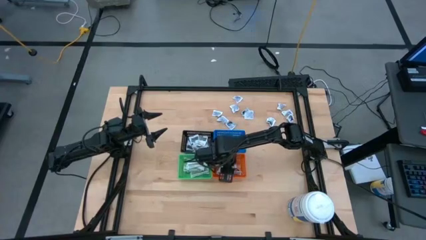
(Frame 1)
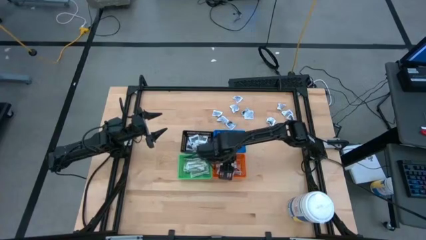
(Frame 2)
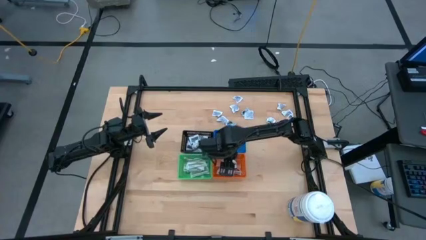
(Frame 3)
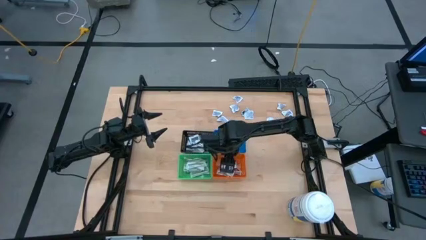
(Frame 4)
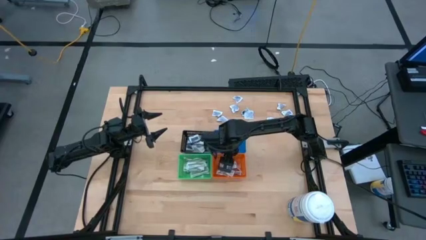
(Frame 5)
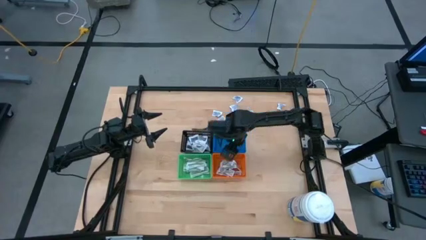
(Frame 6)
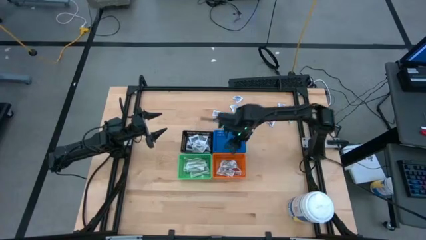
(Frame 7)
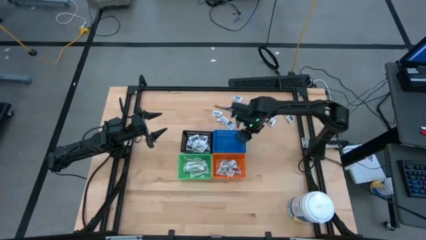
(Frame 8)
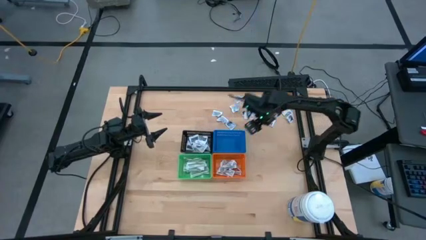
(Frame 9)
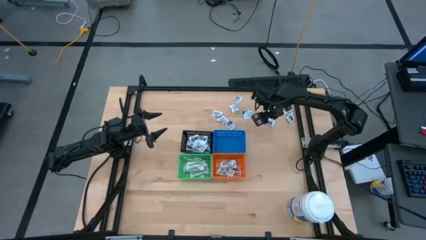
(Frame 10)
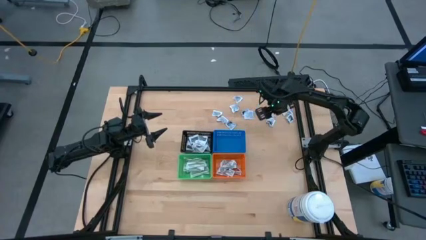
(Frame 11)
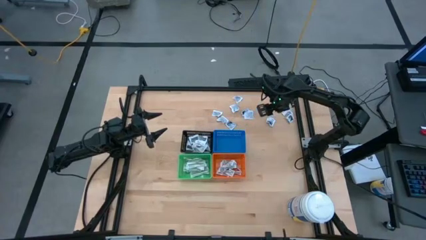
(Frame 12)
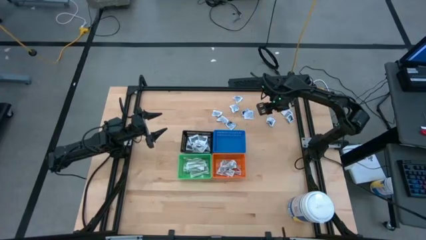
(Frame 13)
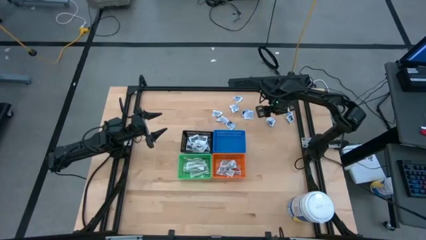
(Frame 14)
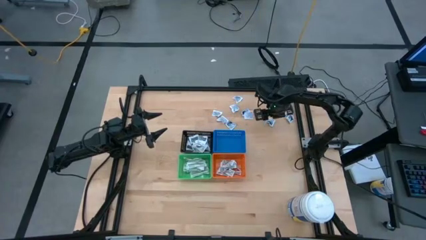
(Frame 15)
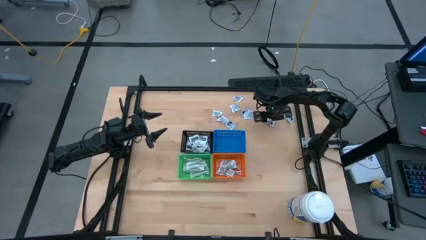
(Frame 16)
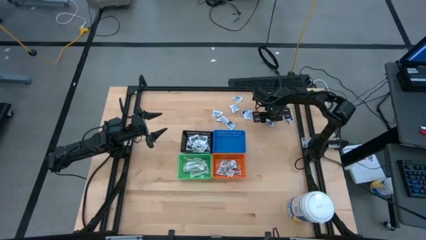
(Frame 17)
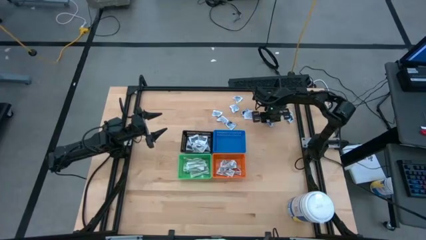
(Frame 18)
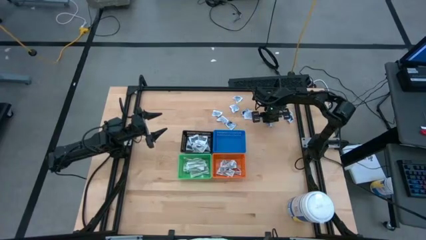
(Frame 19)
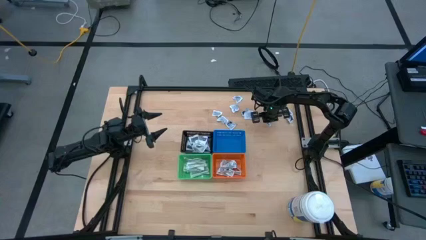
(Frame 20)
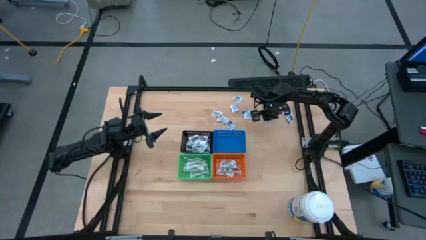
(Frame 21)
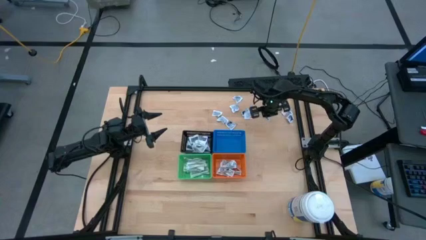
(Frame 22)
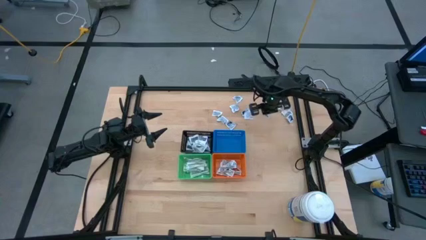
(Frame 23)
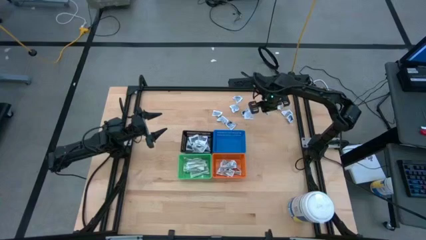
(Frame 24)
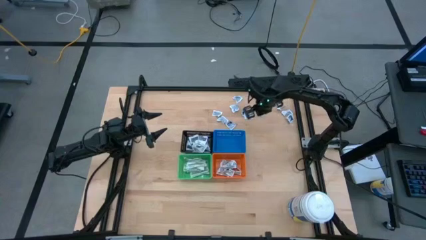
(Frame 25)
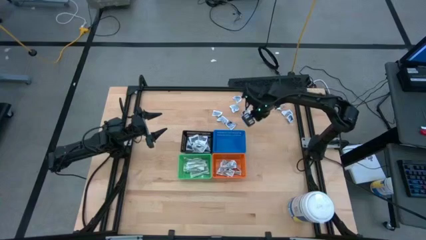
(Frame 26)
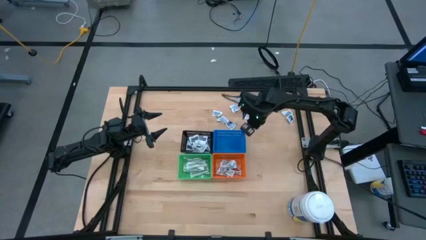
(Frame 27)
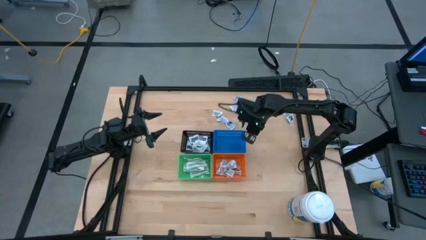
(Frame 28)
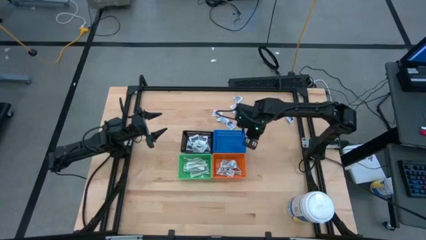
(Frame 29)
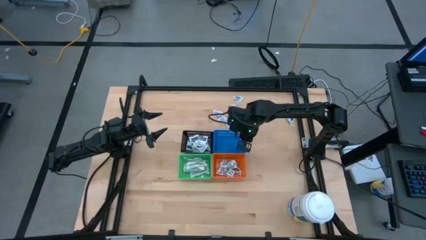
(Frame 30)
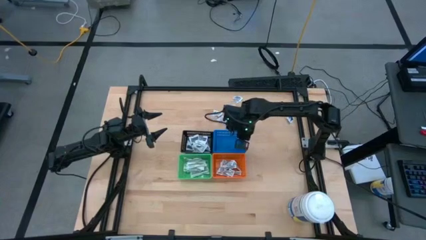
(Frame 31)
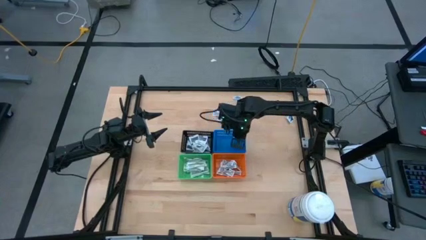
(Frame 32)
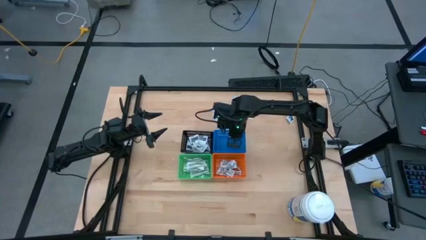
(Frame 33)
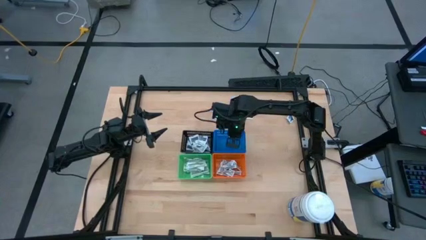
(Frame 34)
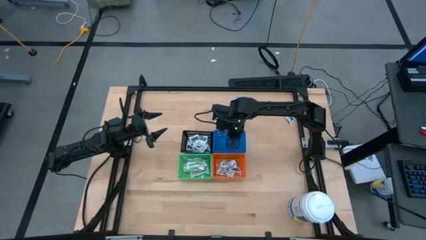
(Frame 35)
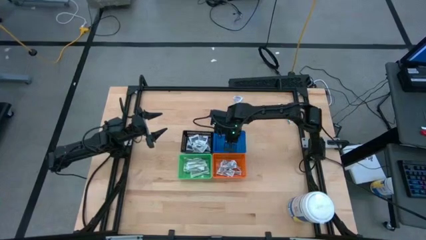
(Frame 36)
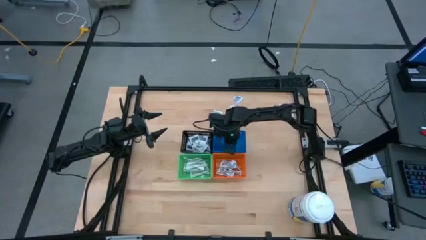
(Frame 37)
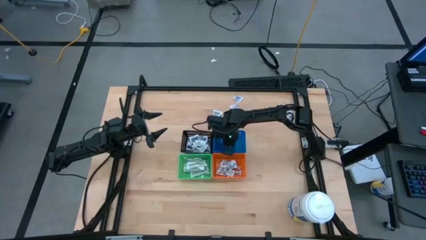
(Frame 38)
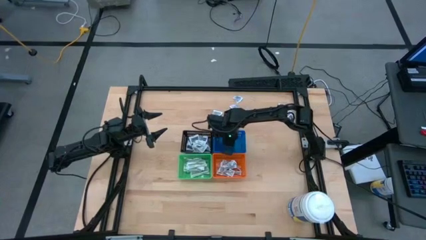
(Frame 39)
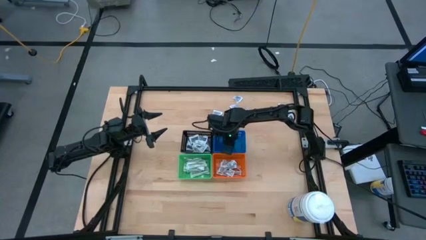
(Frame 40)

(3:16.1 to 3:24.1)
Task: Pick & Place First Aid Supplies
Put the alcohol pad into the blue bin

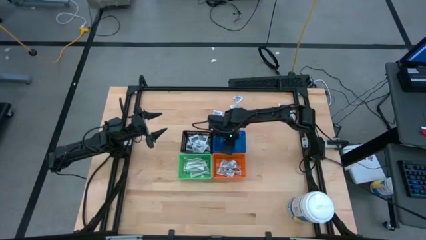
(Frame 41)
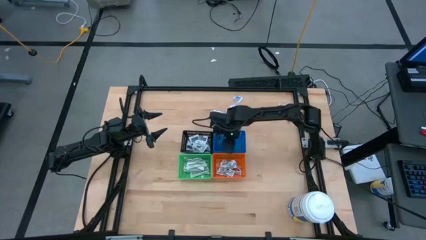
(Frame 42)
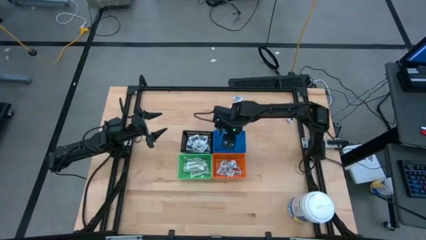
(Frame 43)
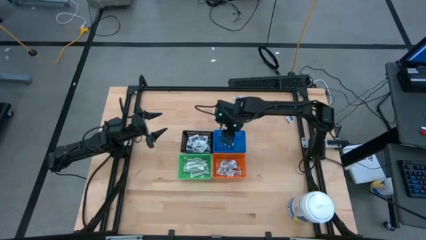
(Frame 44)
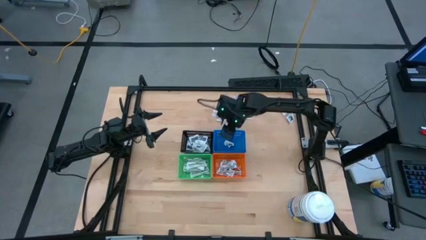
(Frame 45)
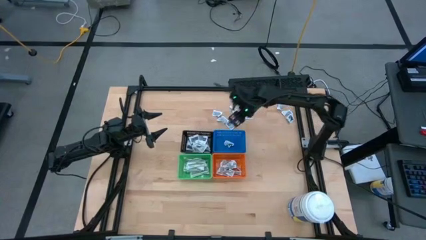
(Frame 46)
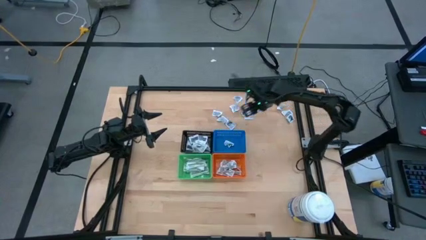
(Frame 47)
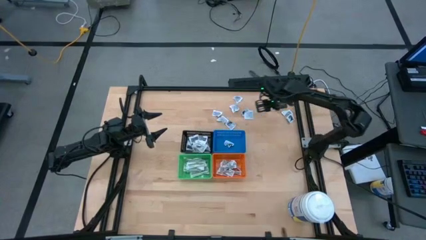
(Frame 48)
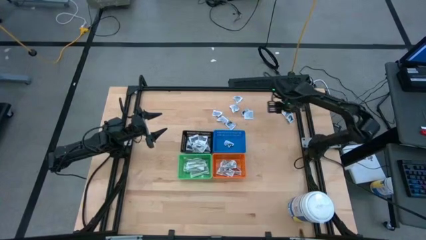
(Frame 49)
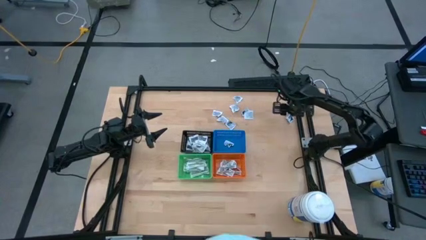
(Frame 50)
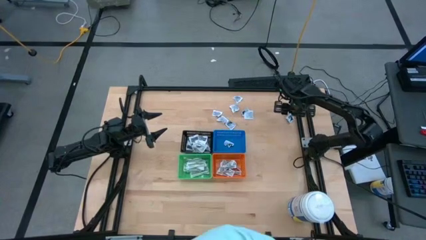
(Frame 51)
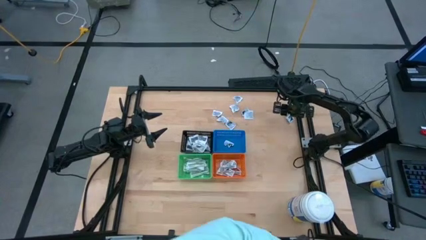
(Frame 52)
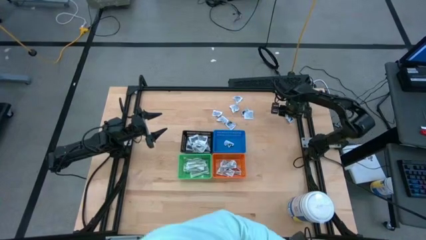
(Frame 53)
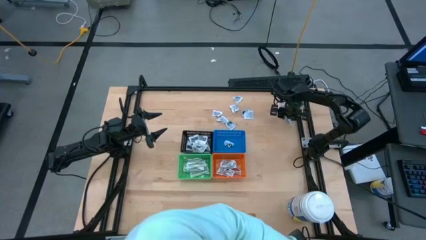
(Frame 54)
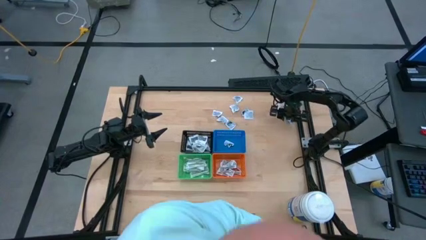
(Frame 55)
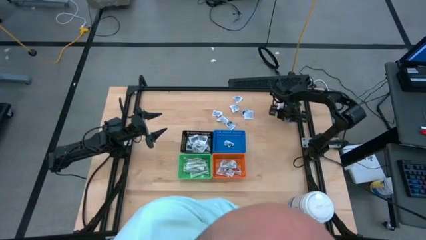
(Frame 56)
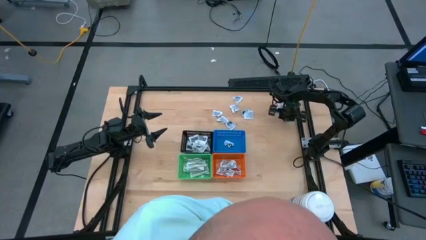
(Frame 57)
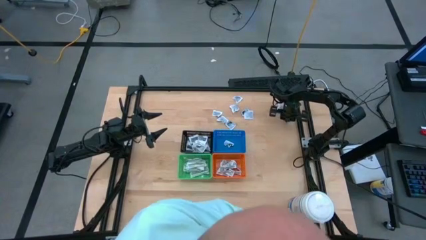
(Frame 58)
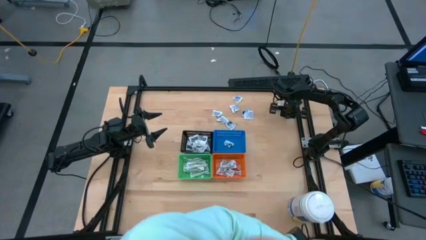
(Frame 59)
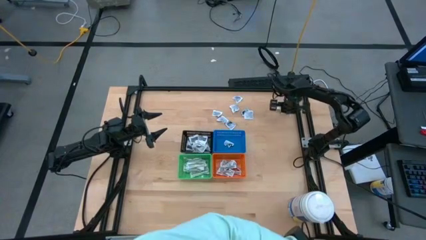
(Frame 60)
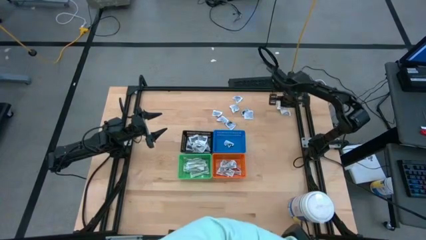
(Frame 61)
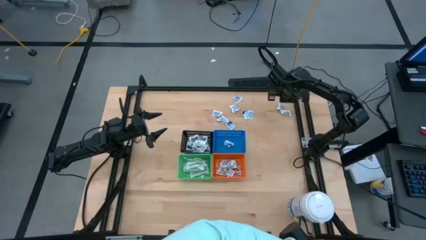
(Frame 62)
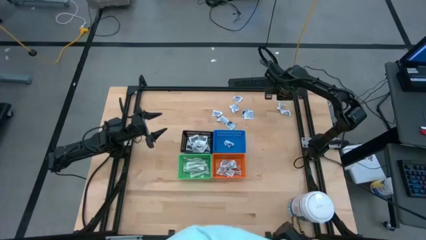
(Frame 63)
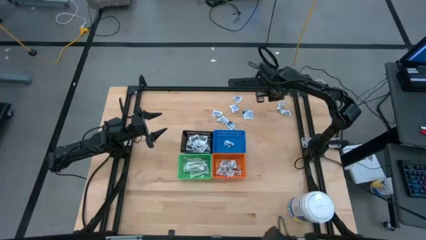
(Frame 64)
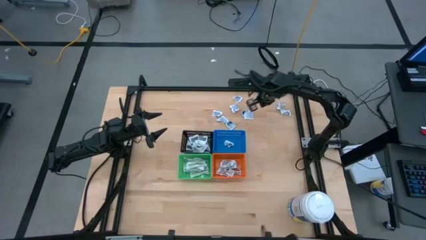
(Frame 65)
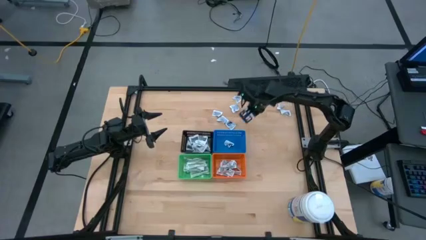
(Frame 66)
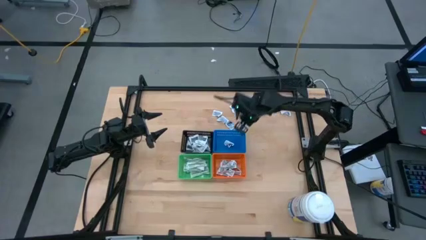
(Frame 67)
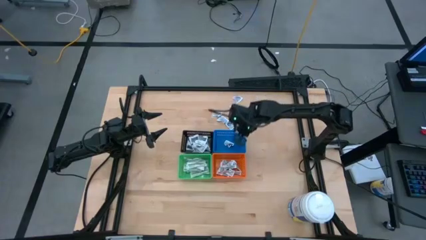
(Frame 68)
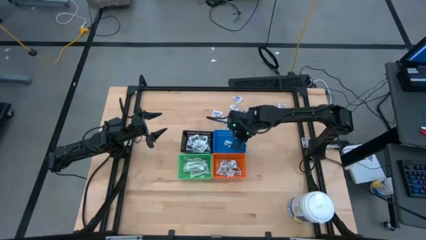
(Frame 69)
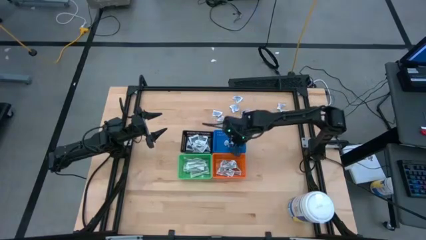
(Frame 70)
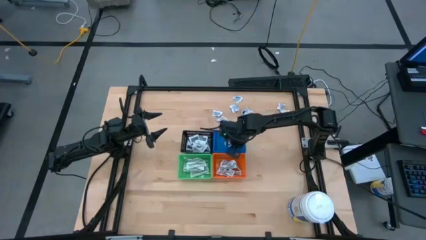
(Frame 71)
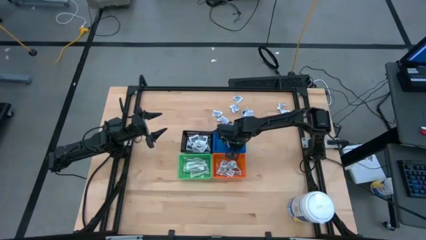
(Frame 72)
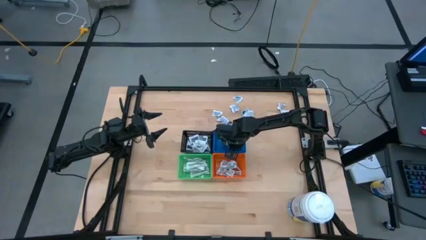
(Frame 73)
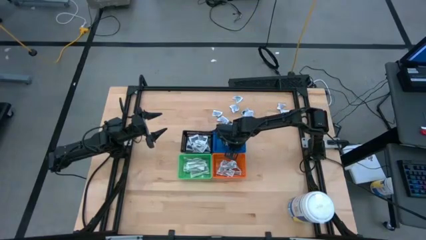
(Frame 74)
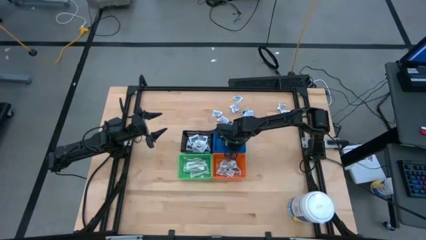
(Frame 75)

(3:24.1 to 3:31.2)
Put the alcohol pad into the blue bin

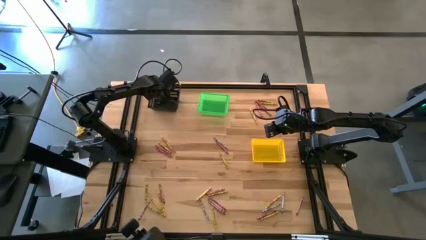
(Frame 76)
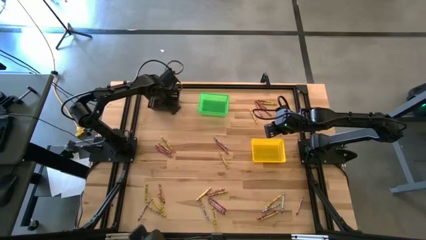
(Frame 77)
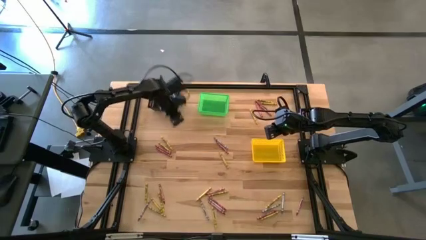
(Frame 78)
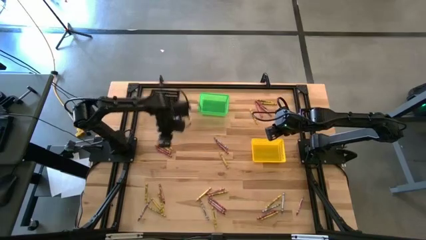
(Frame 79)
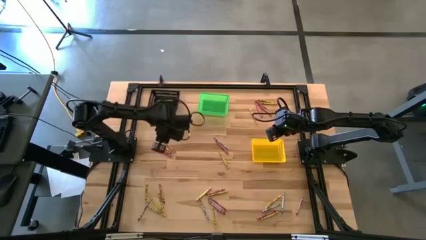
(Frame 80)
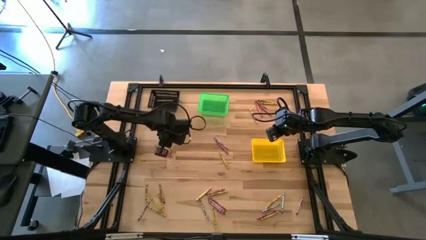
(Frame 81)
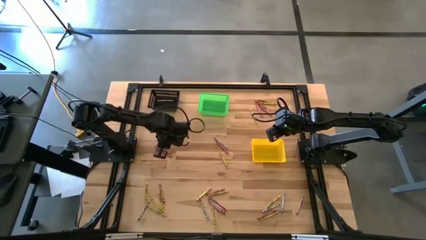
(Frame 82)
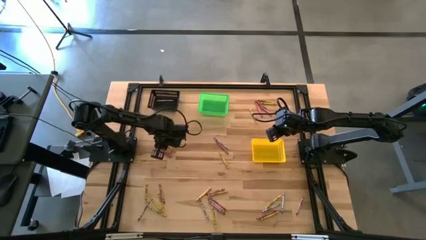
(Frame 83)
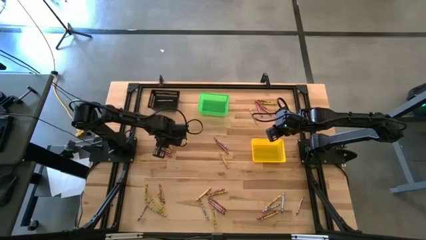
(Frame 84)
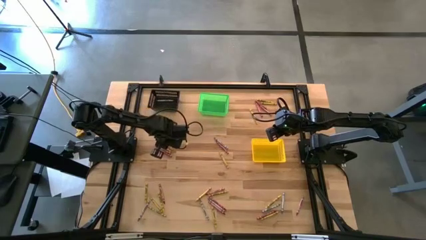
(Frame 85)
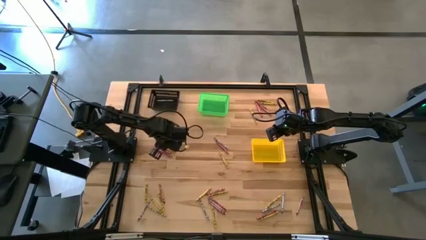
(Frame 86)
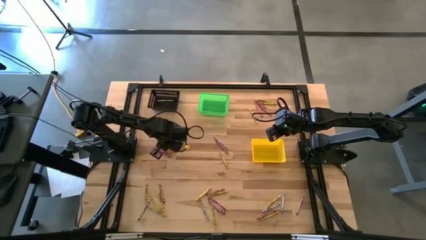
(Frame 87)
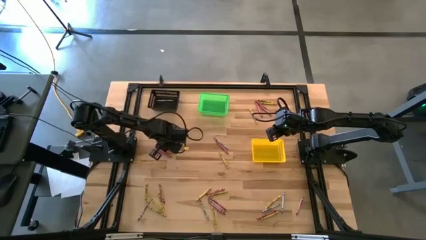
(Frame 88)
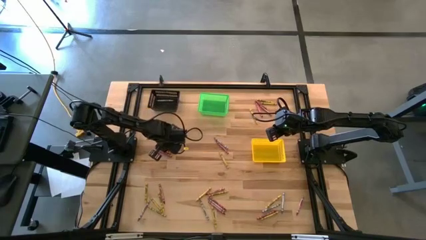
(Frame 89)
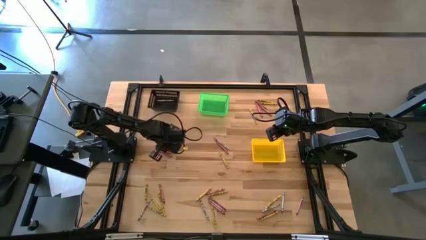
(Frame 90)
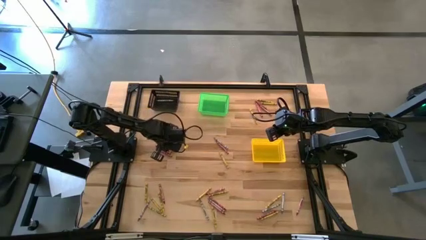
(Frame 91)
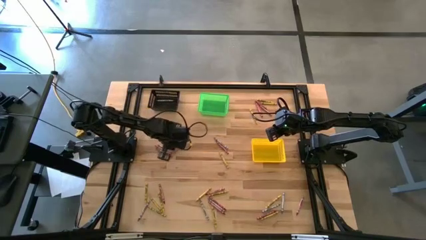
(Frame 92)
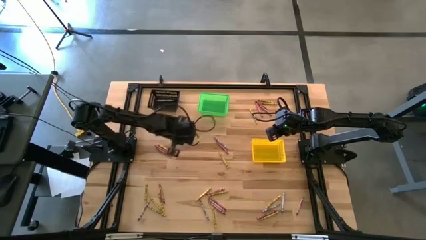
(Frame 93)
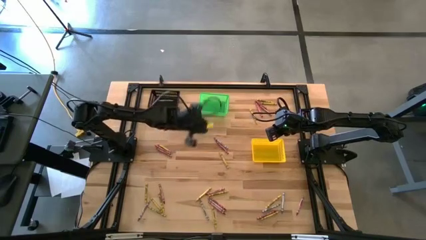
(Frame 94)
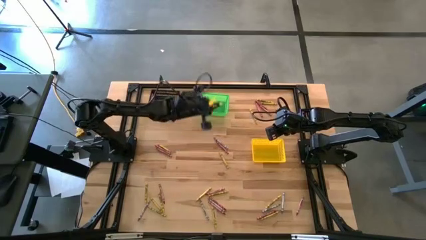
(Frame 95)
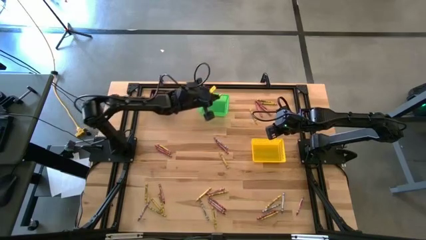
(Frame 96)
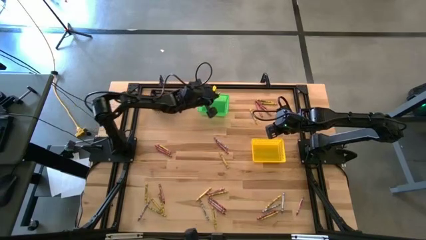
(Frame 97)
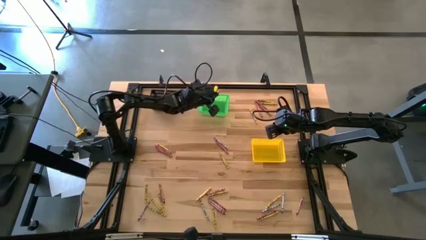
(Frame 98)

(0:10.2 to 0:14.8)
Task: Sort crayons
Put the yellow crayon into the green basket
